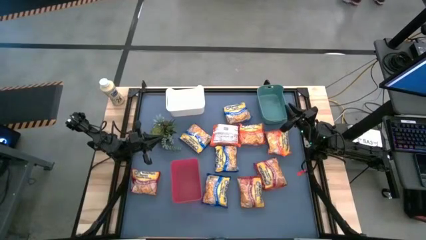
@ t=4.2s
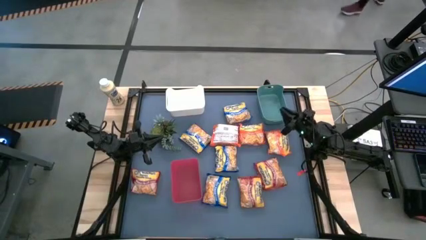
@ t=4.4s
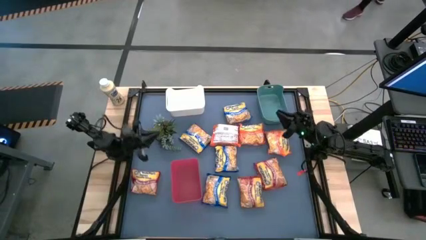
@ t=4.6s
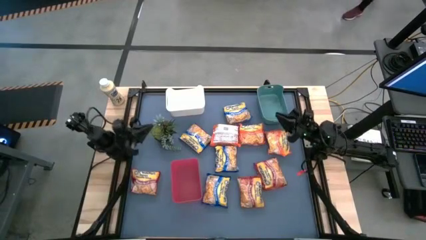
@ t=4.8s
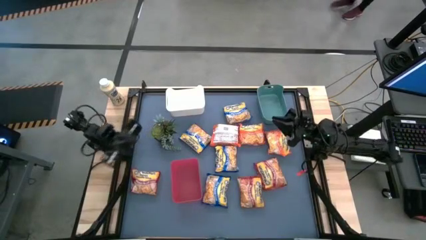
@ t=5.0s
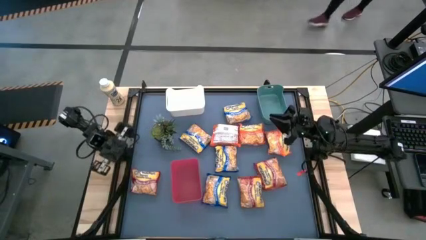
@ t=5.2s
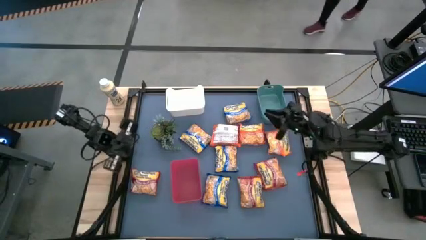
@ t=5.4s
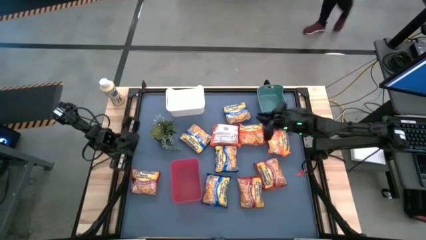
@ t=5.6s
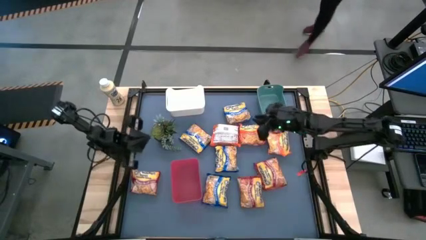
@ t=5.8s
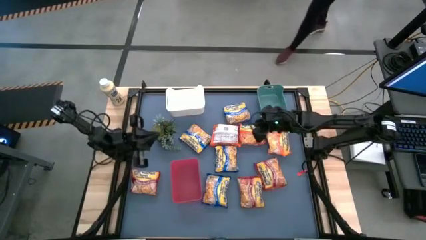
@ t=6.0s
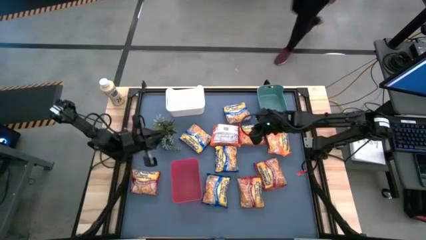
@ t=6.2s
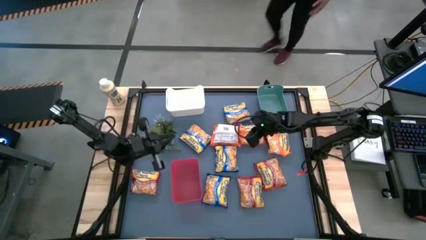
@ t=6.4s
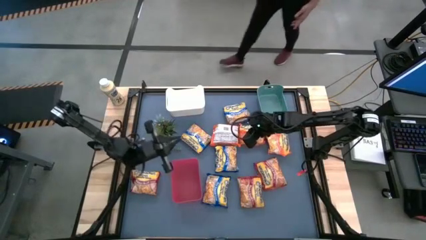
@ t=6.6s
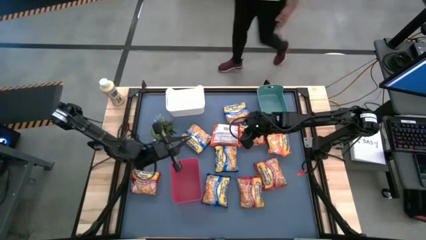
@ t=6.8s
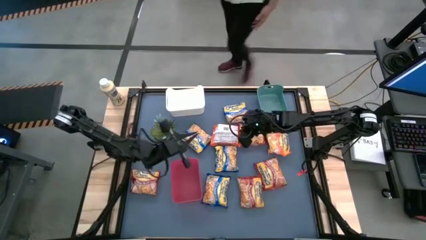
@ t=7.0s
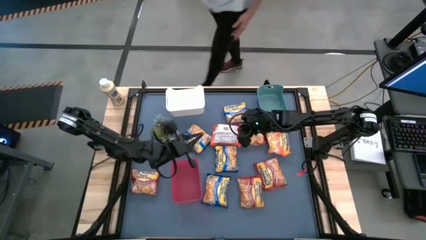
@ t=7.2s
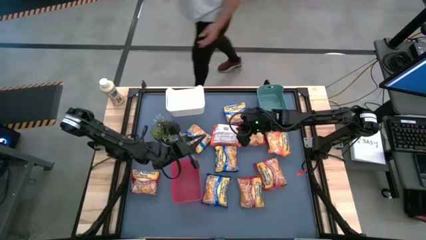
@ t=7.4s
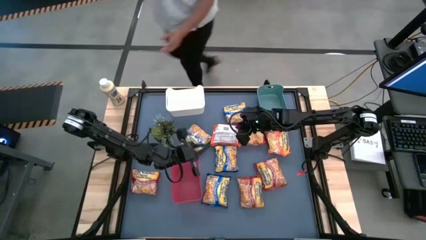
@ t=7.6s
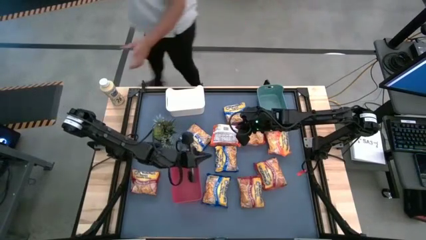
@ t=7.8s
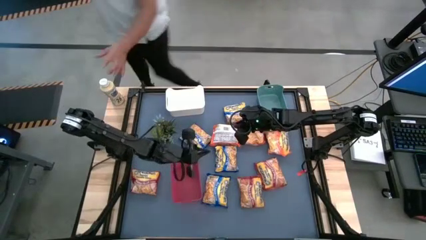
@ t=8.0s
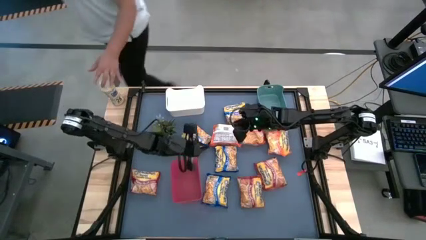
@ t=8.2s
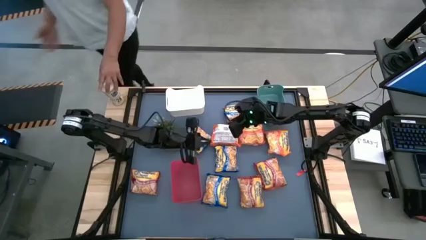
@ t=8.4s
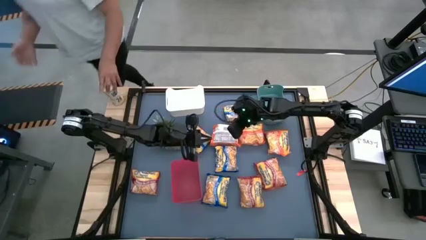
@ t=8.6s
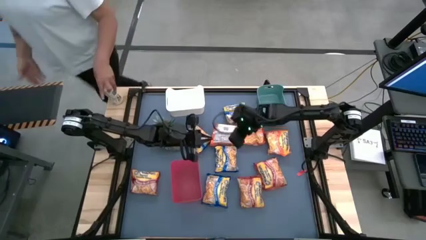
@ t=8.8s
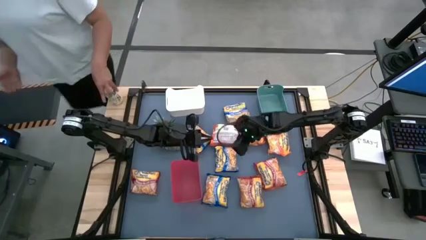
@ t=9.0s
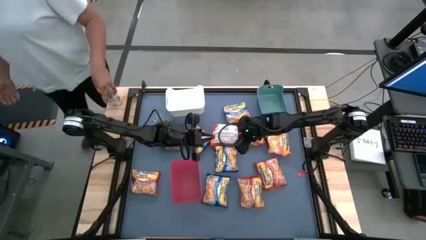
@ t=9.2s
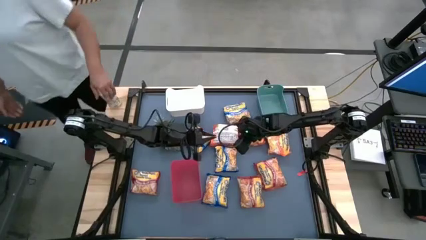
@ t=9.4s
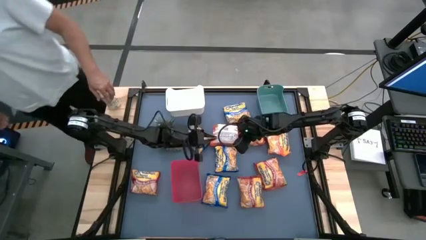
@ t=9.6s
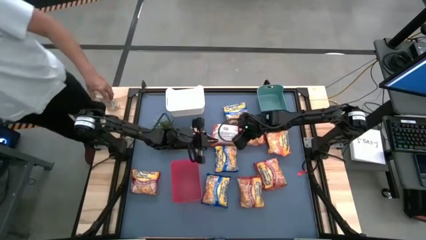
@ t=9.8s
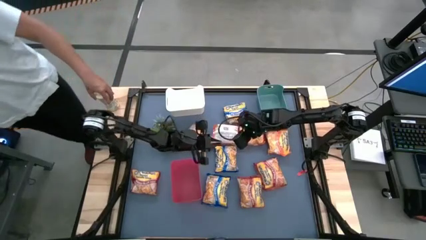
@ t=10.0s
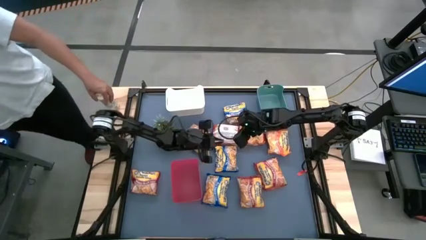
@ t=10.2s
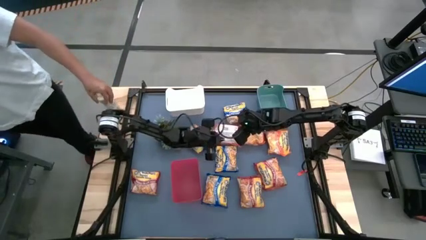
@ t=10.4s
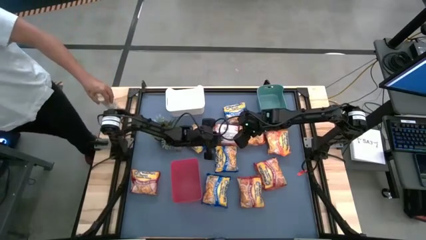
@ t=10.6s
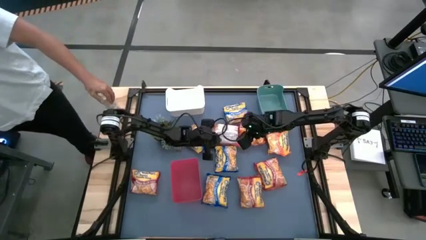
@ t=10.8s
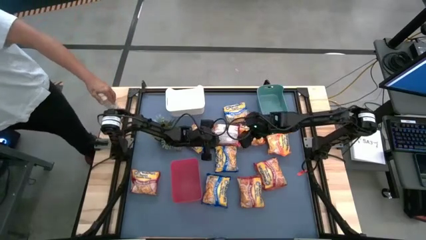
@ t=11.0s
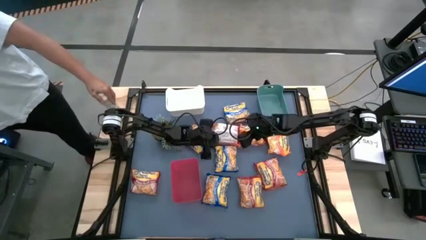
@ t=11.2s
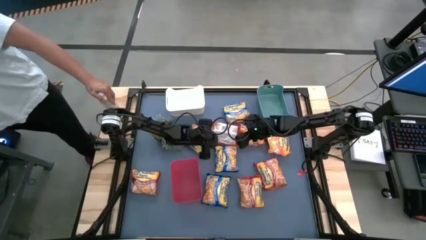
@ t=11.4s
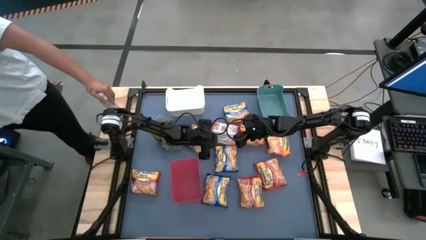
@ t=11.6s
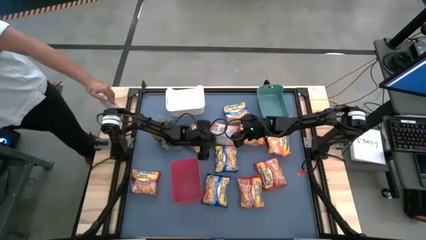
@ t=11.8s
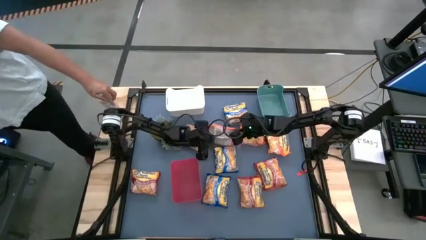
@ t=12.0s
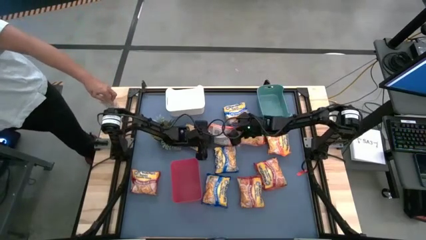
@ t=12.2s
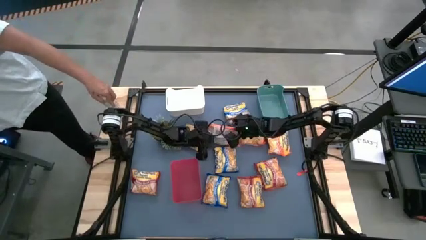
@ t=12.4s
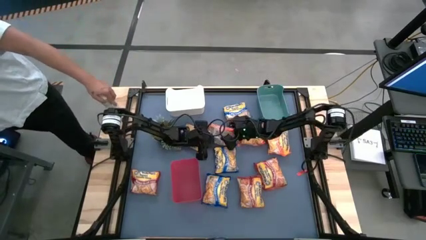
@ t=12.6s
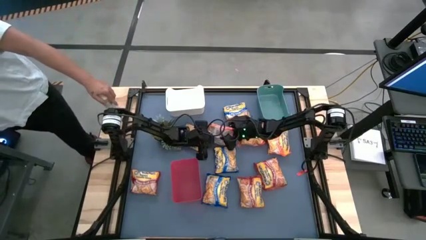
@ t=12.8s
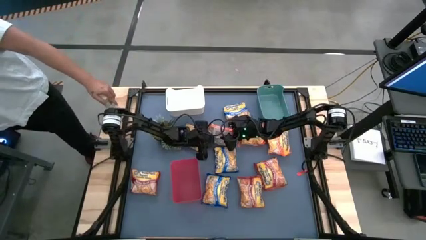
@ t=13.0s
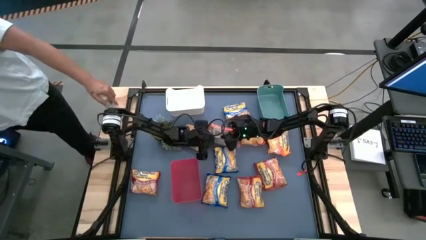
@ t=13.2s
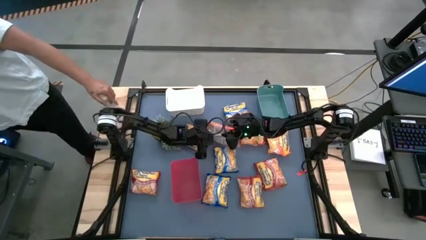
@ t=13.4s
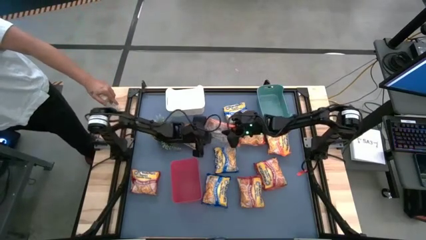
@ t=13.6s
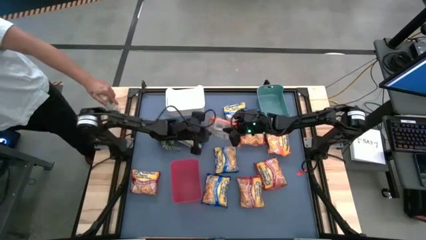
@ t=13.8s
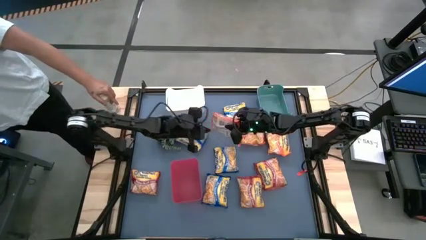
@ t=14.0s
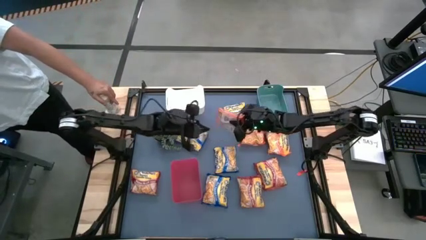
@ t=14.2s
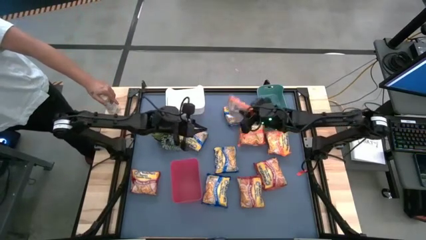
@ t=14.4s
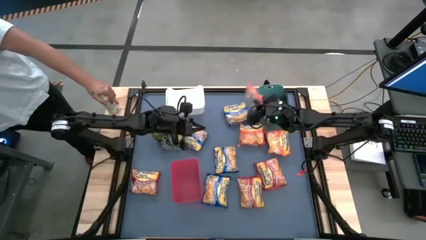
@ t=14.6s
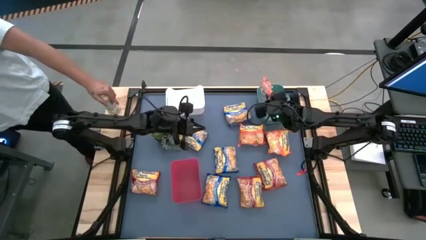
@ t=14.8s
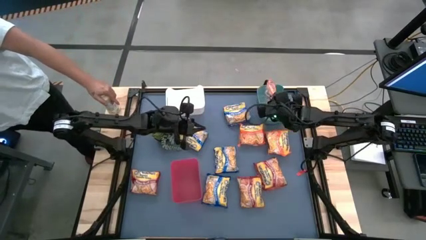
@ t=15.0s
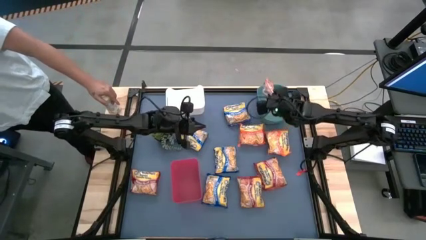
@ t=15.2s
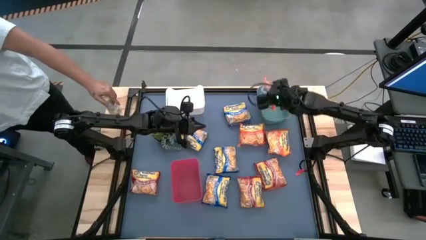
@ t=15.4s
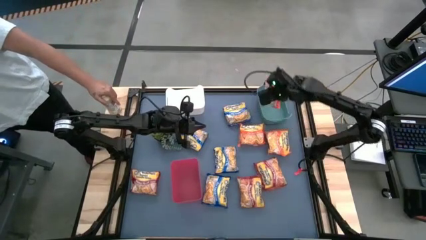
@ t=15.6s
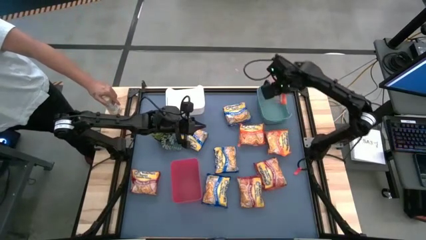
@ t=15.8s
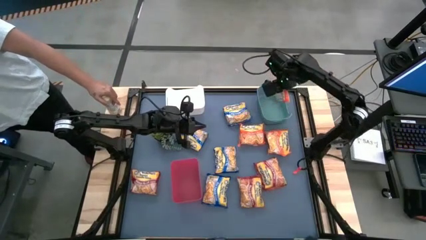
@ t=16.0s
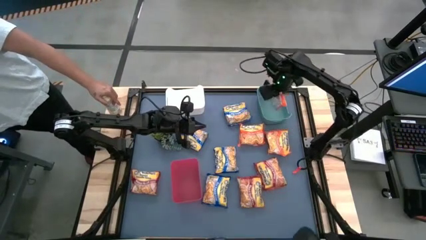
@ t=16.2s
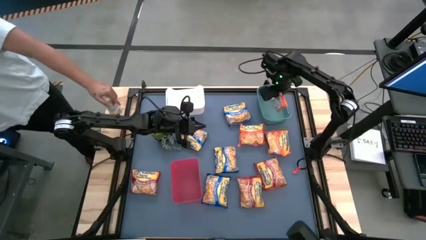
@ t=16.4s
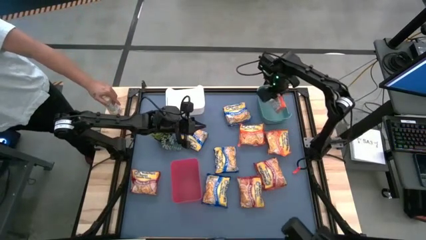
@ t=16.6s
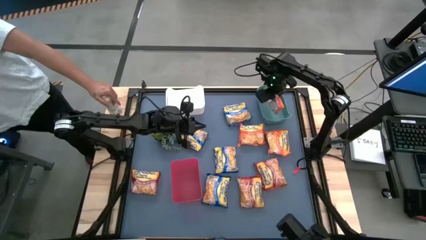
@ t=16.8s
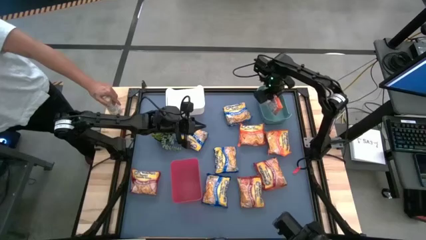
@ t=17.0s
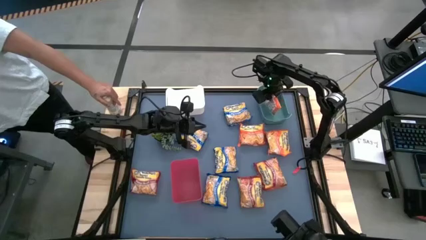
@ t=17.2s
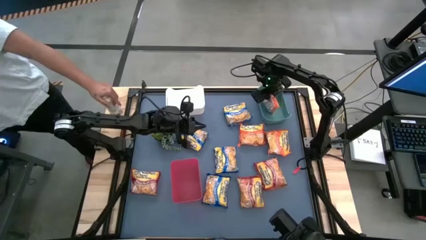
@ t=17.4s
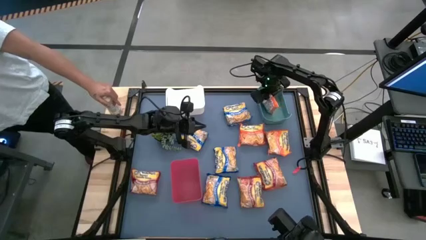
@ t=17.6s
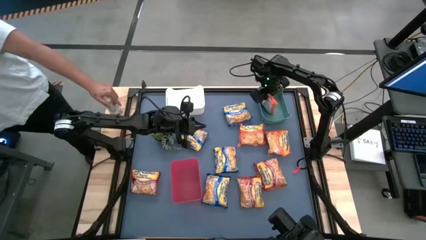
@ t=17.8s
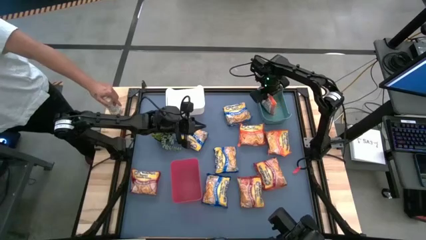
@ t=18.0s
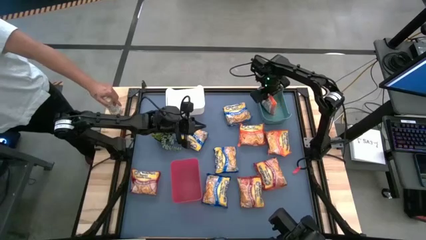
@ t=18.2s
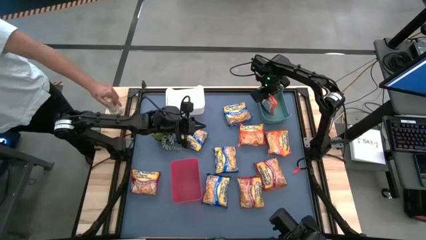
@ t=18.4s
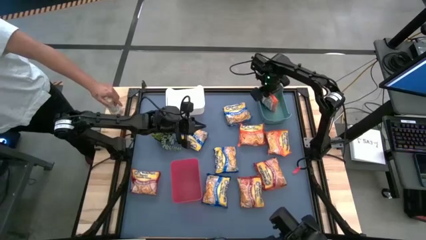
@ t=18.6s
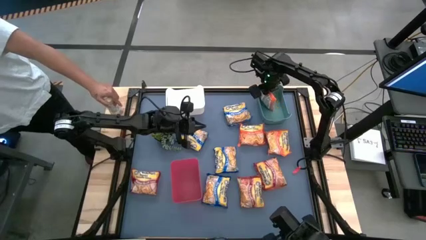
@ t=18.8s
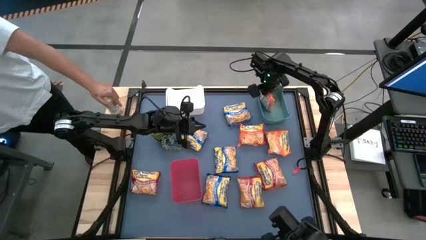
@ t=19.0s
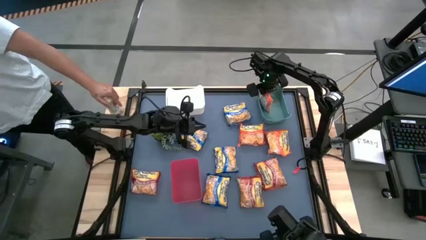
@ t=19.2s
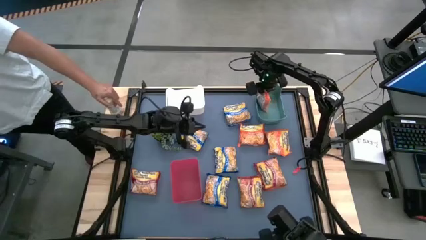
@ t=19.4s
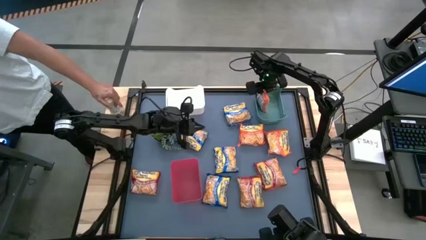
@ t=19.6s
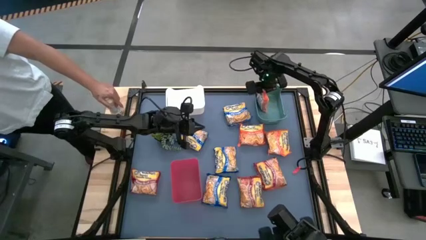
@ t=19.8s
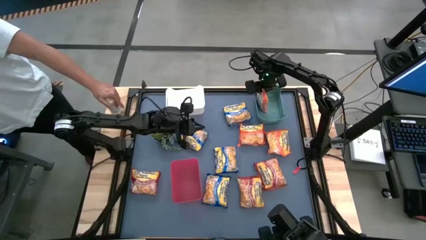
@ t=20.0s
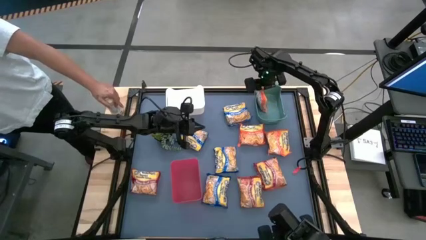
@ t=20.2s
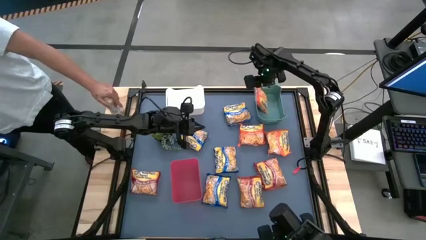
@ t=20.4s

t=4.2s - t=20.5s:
Task: Sort Maruchan noodles
Put the left orange noodle pack into the green bin
